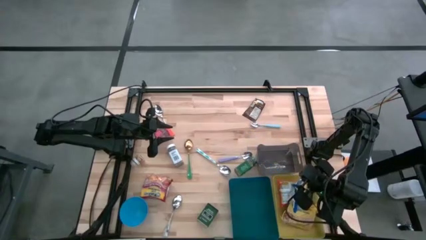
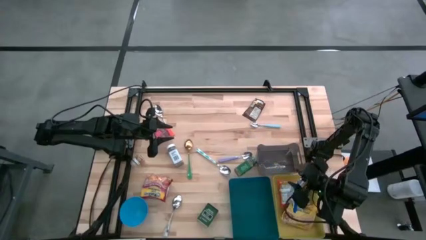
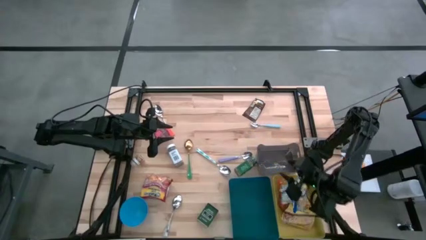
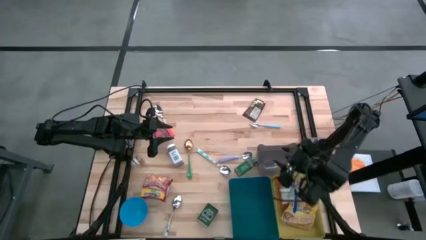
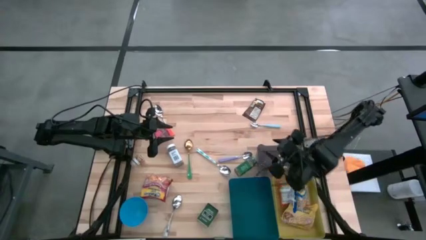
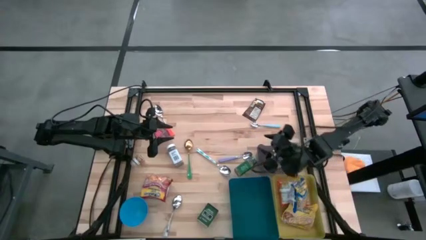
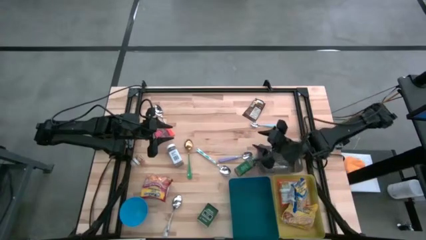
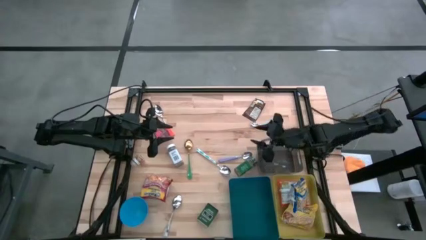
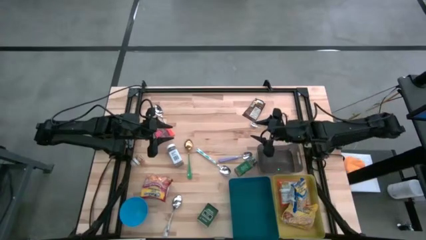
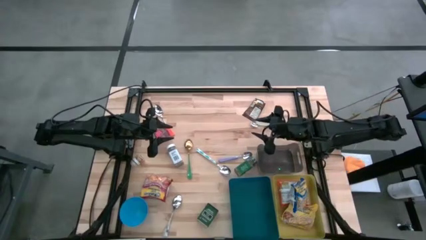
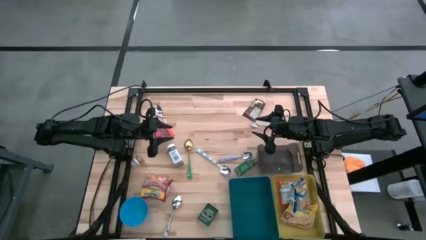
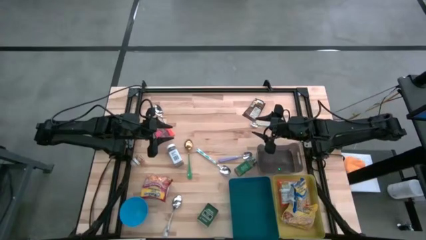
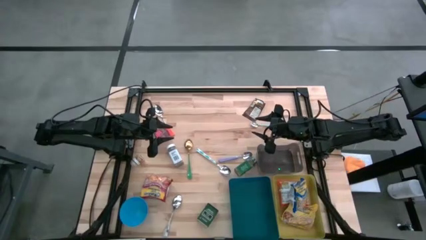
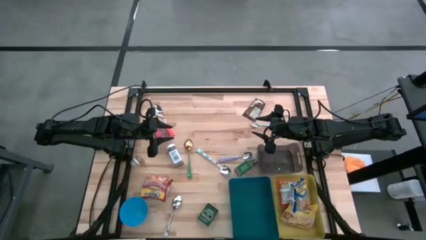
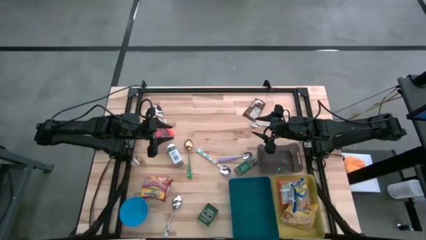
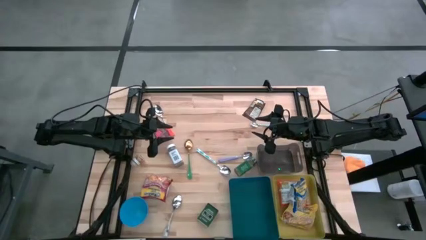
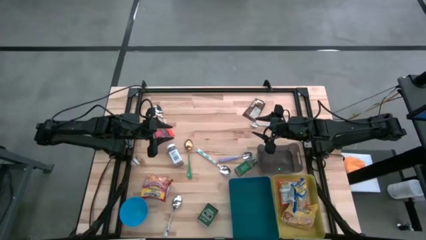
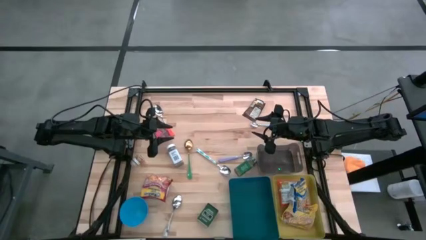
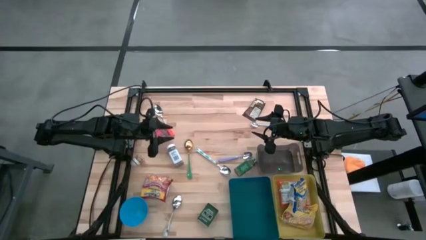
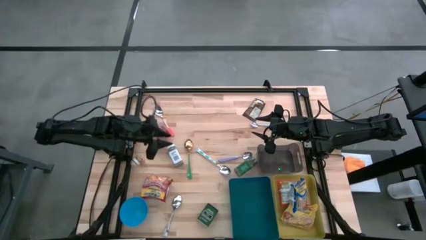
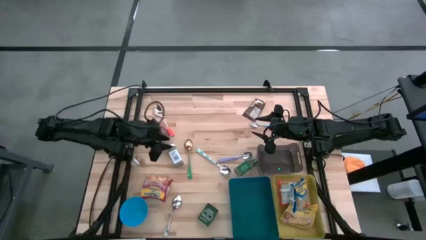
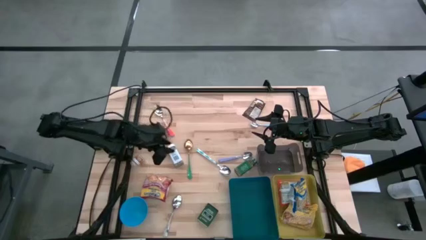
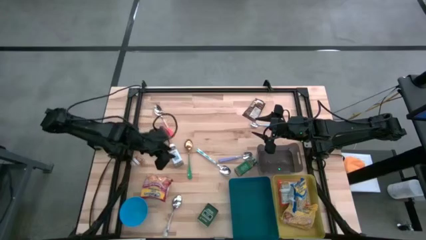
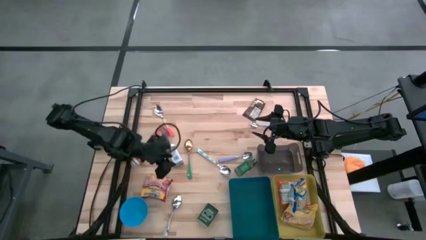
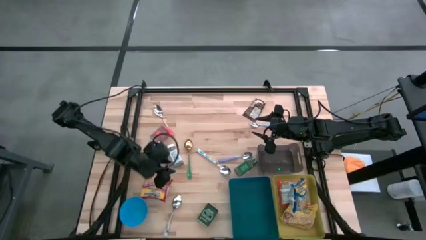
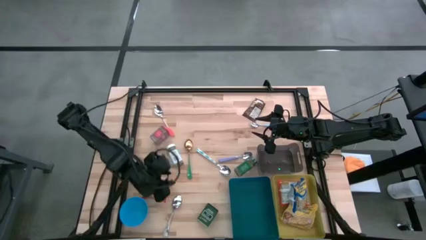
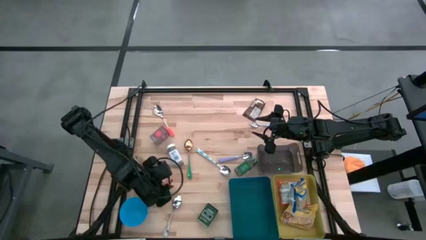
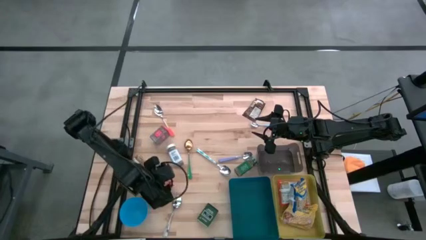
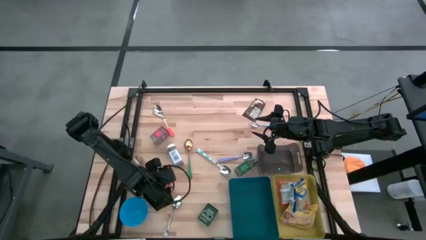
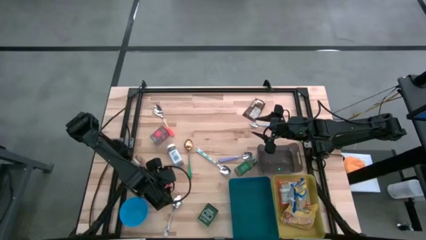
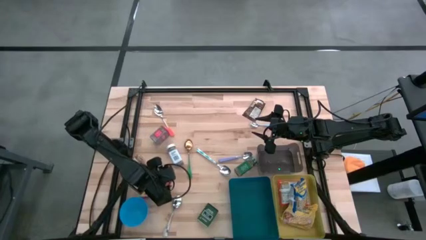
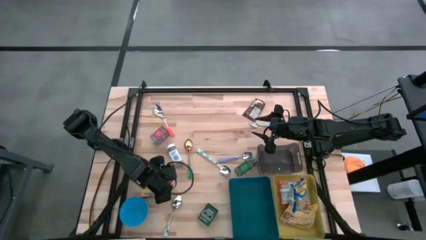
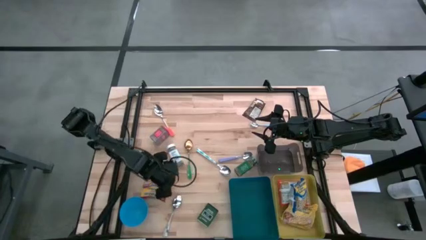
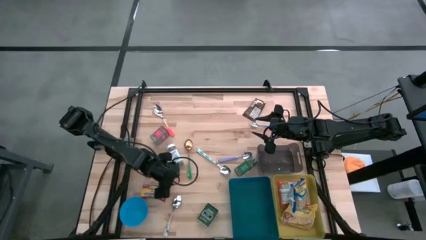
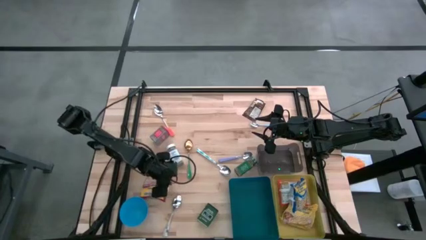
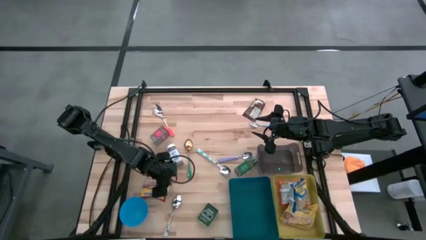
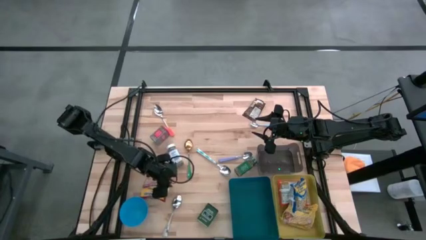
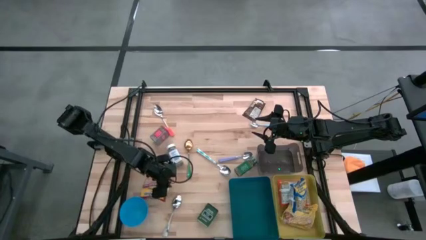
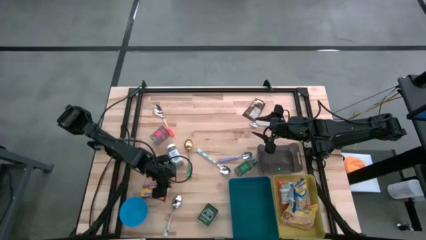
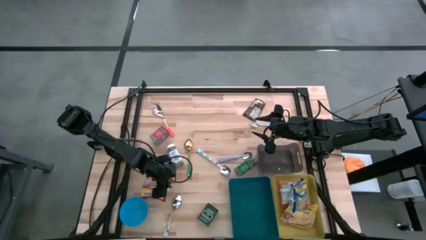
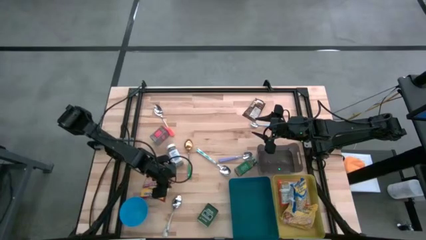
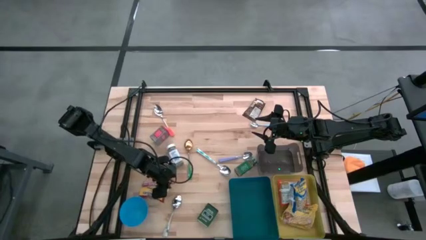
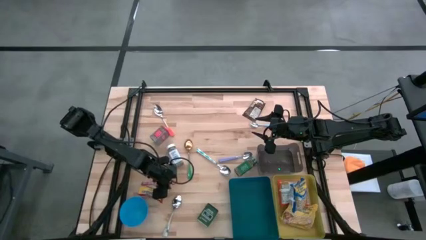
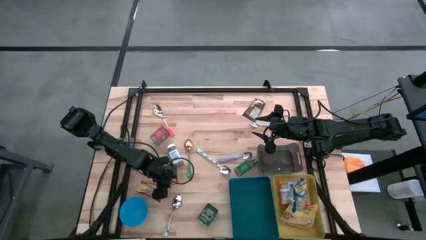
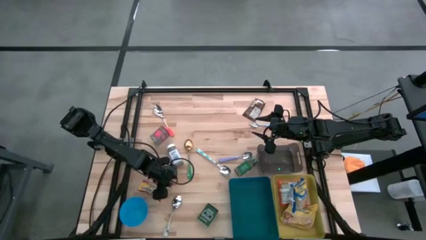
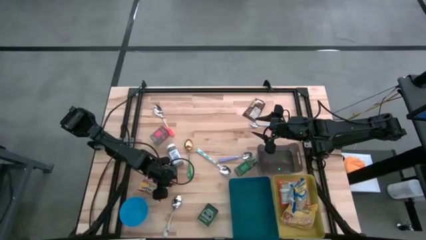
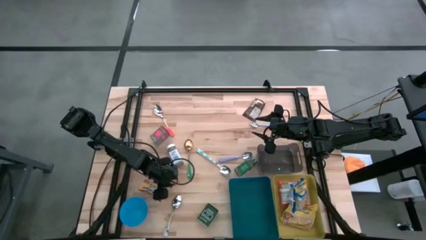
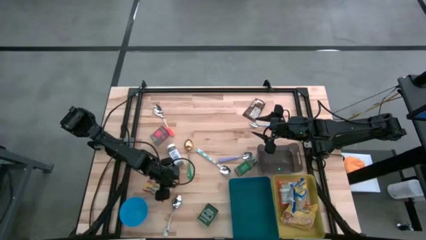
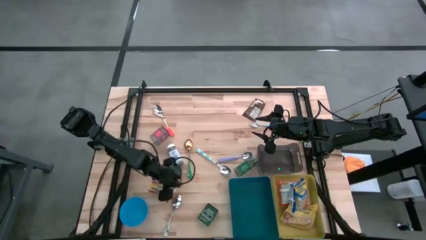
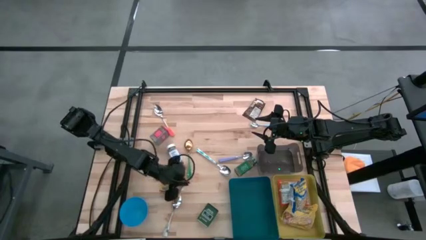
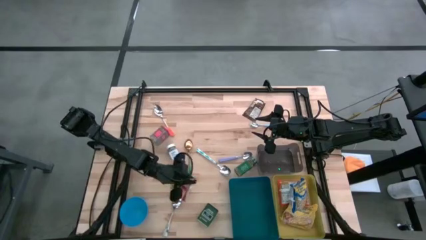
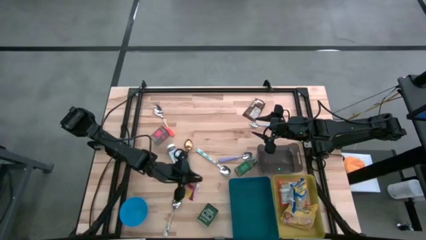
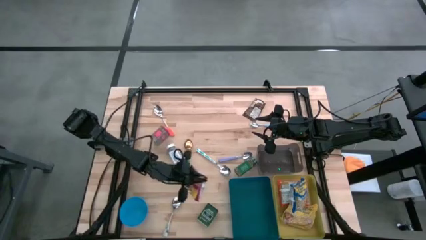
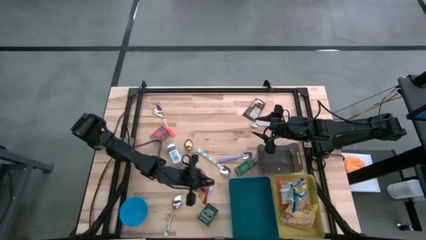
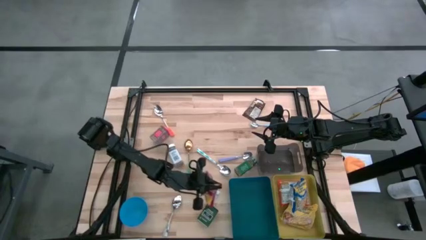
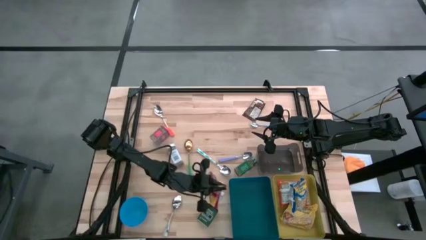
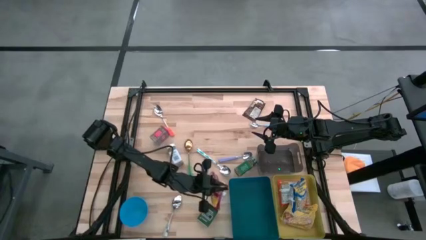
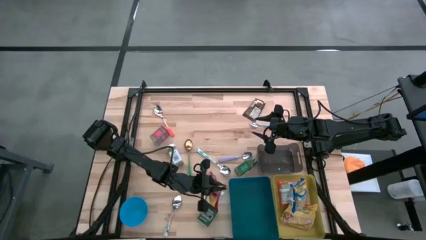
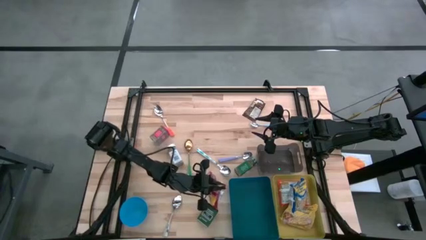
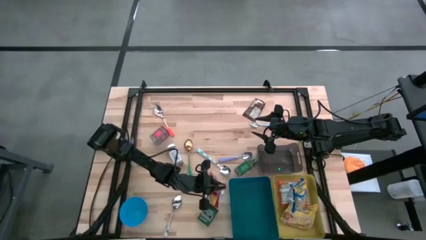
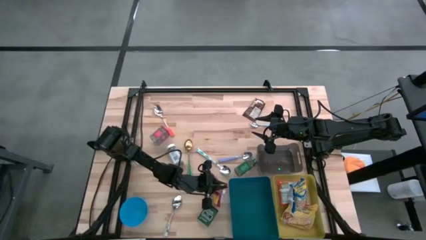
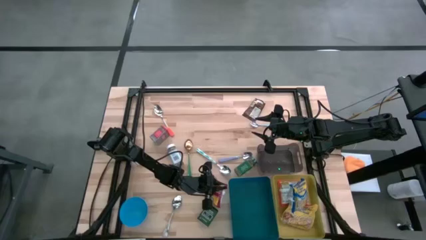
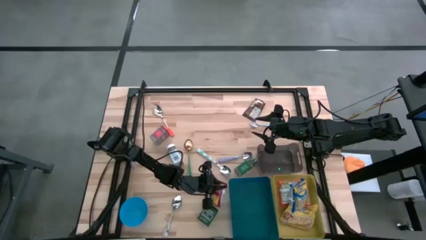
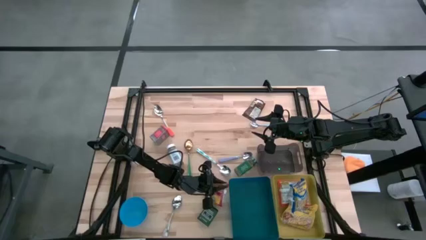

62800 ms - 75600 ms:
Put the red noodle pack into the yellow bin
